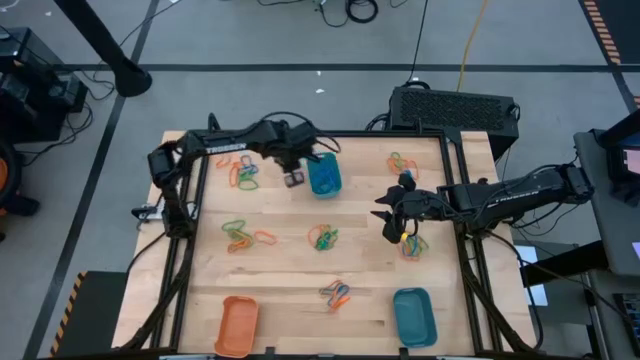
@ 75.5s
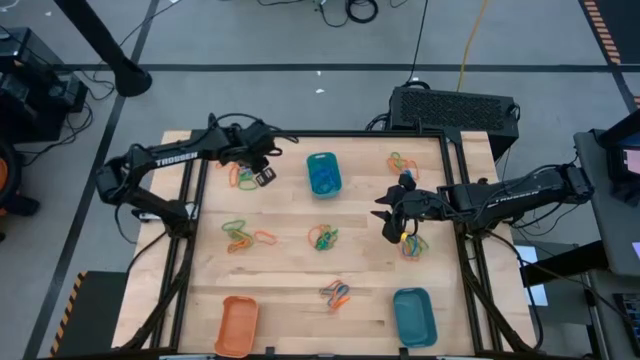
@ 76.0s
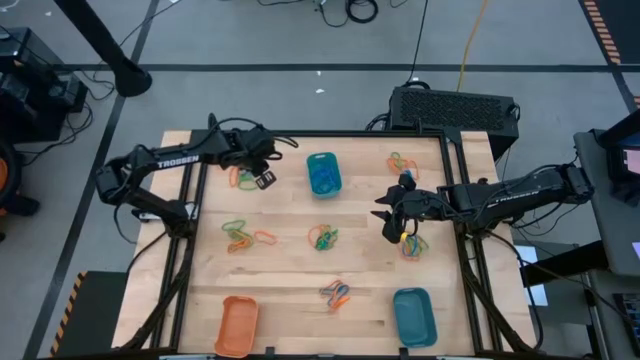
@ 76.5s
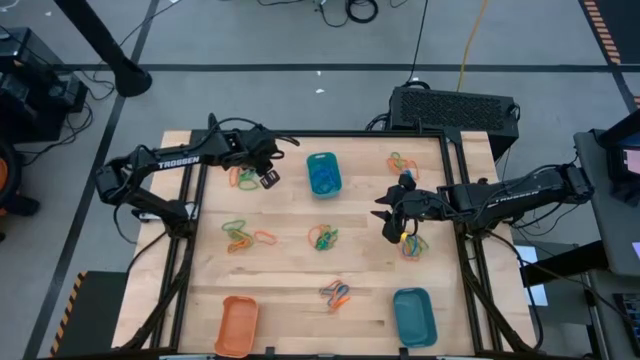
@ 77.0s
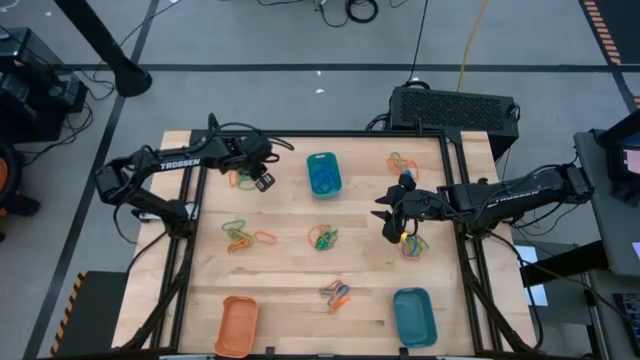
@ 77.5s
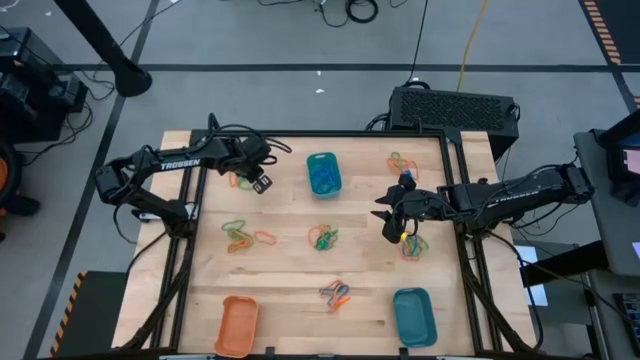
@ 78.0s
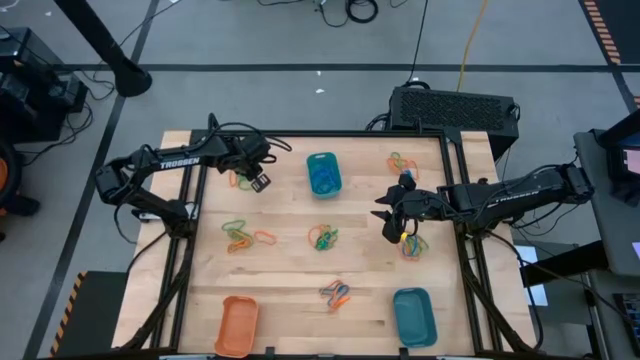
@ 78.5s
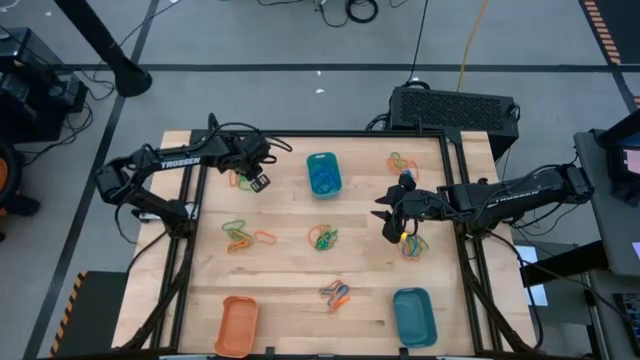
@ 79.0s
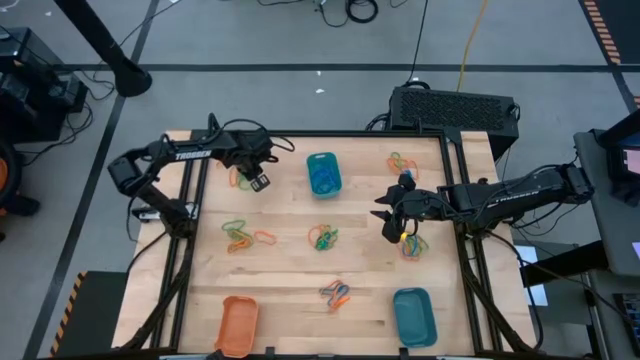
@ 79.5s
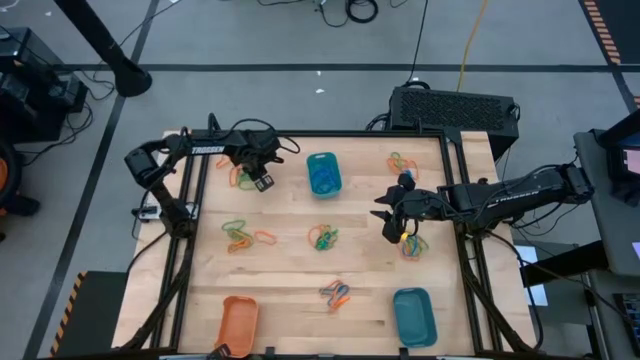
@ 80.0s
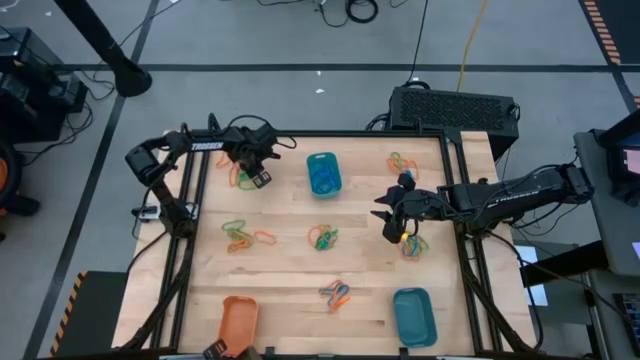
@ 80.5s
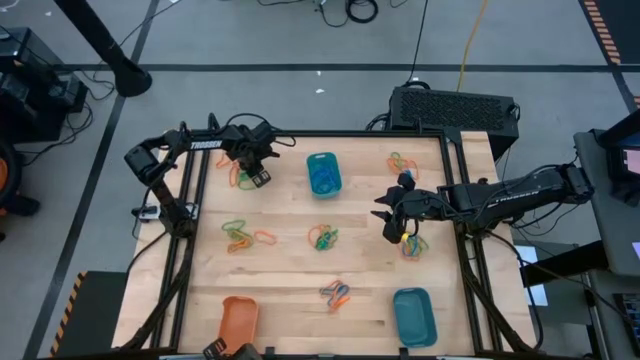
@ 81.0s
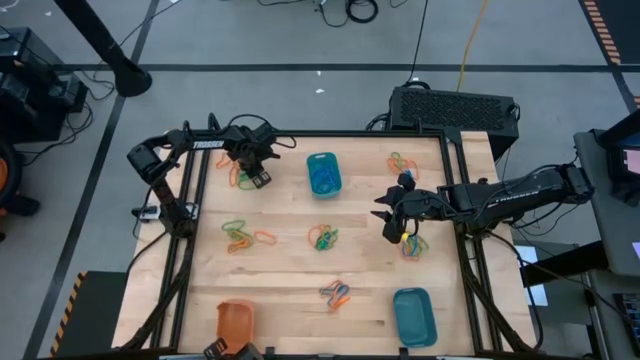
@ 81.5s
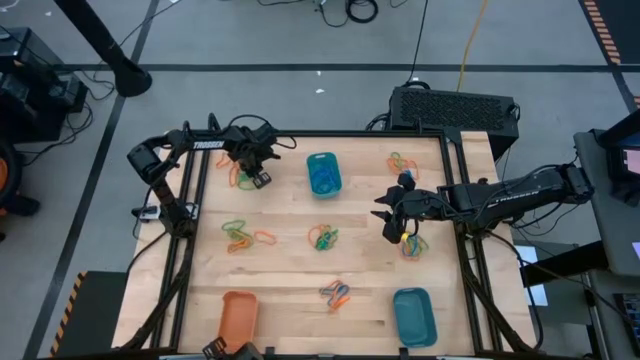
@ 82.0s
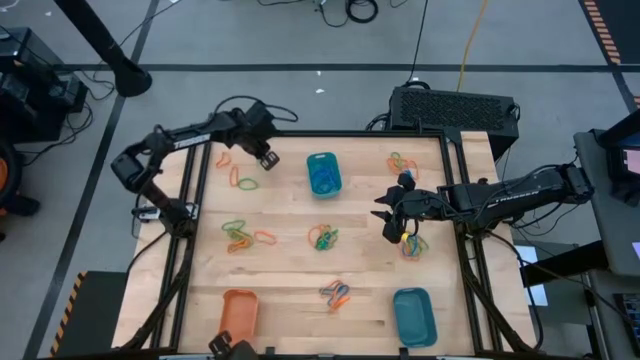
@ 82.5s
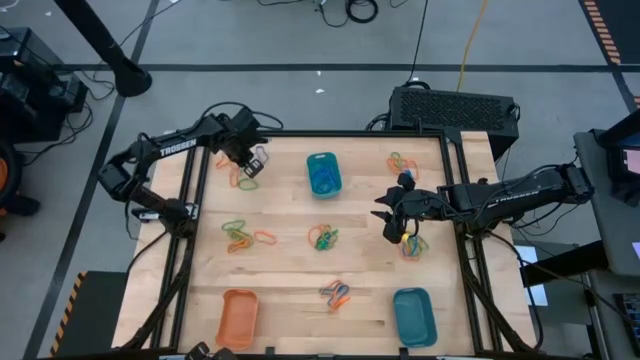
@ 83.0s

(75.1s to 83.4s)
Task: Sort rubber bands into baskets
Put the blue rubber band into the top blue bin

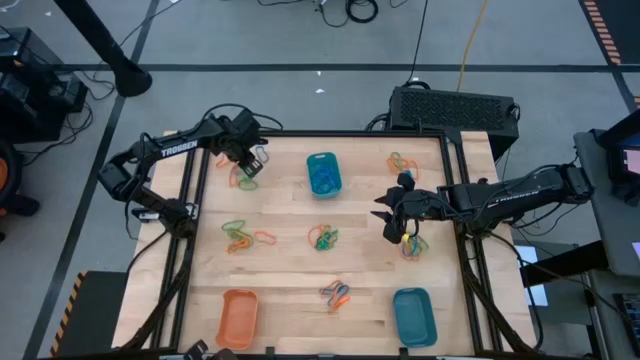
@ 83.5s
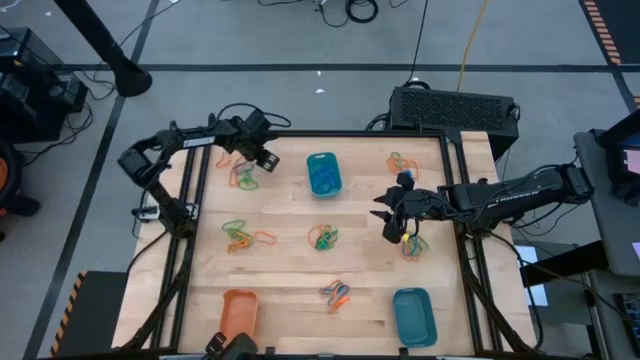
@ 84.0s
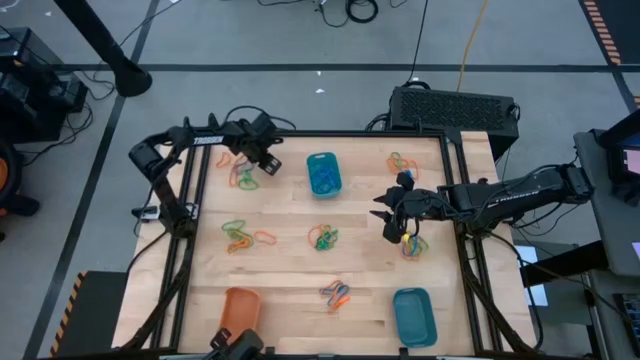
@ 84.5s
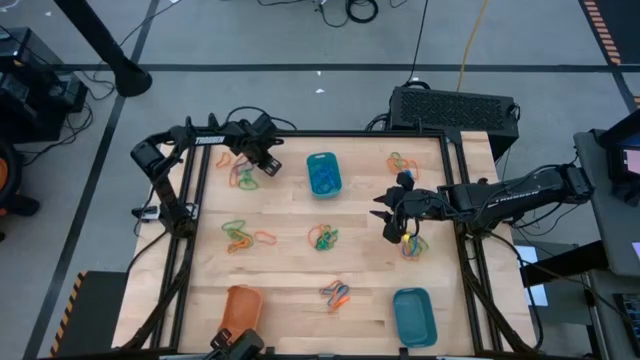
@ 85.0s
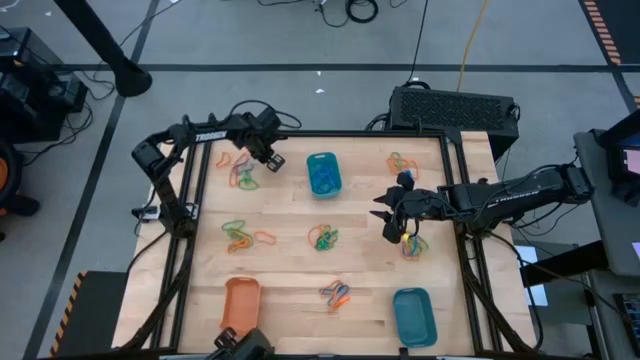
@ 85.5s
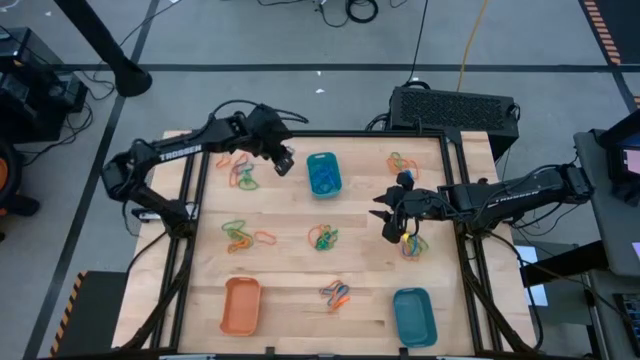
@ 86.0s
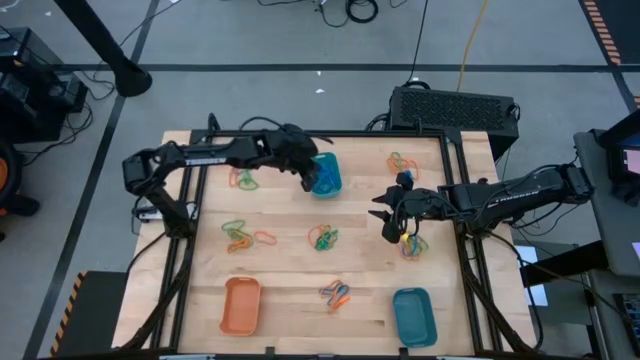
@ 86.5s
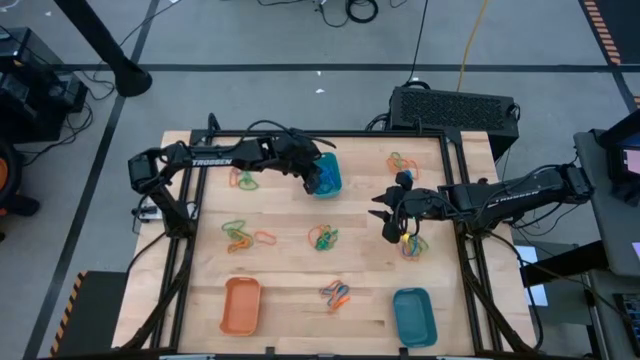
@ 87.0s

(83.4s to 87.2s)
Put the blue rubber band into the top blue bin

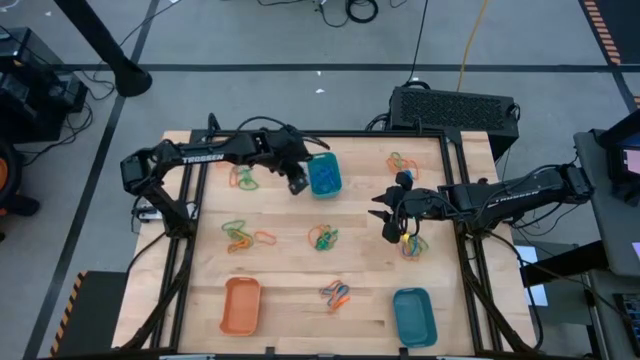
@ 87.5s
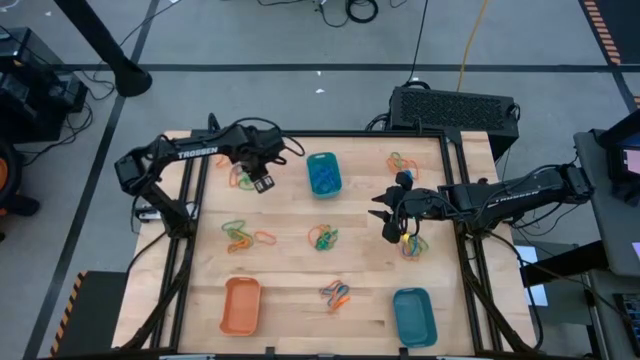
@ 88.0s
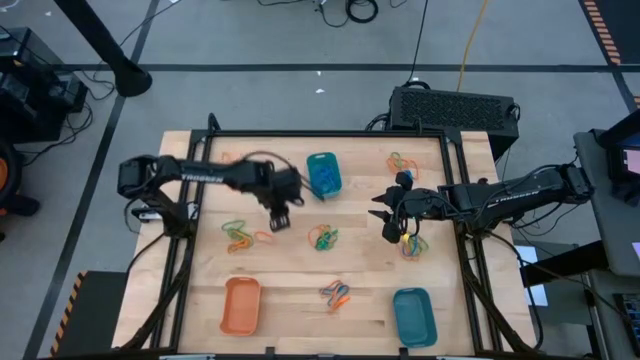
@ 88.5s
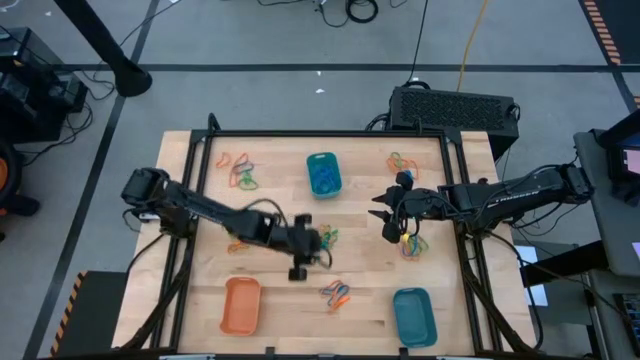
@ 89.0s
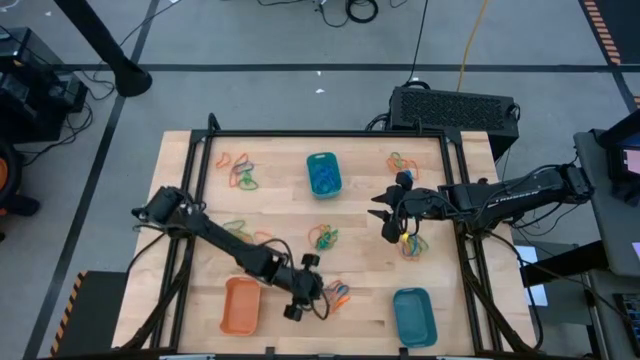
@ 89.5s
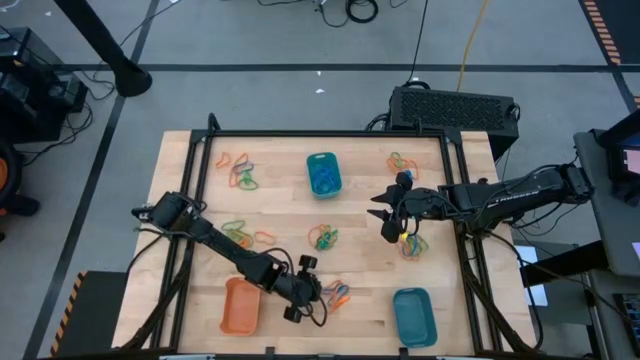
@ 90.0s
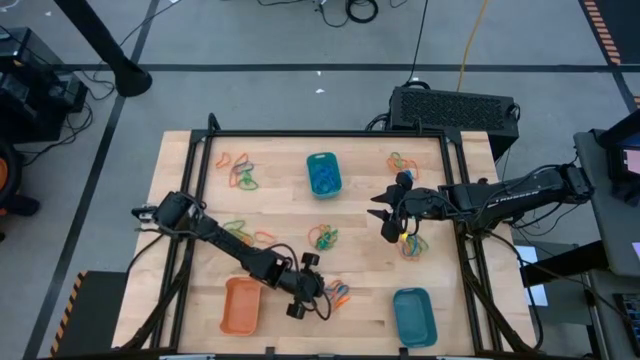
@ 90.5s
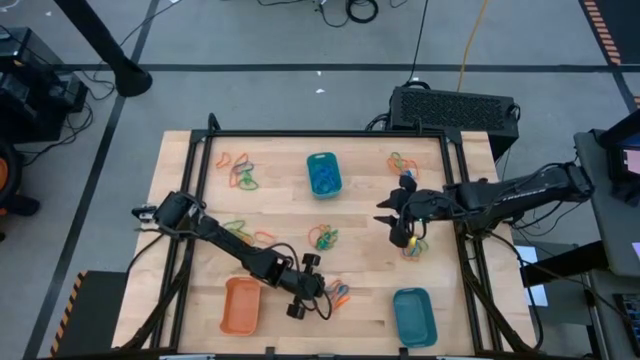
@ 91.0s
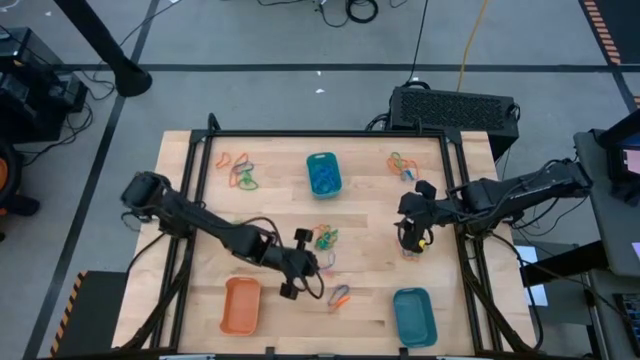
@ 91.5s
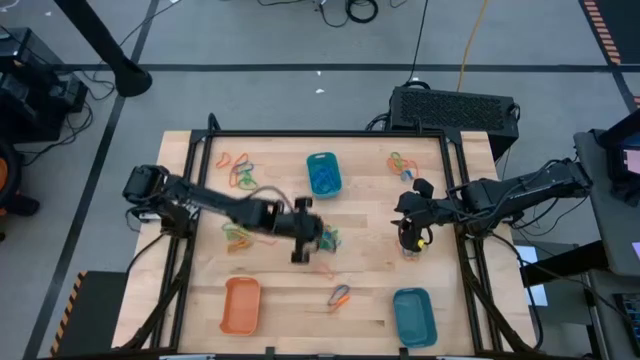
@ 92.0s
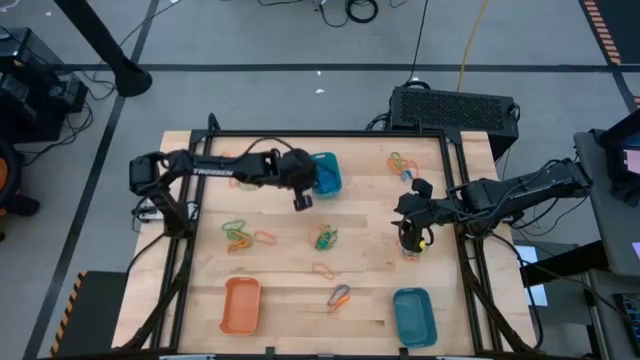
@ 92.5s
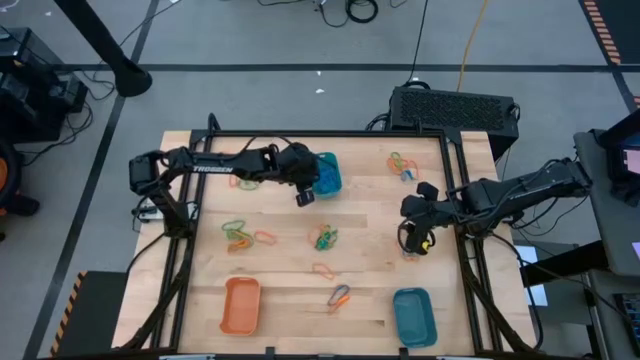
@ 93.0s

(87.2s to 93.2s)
Put the blue rubber band into the top blue bin

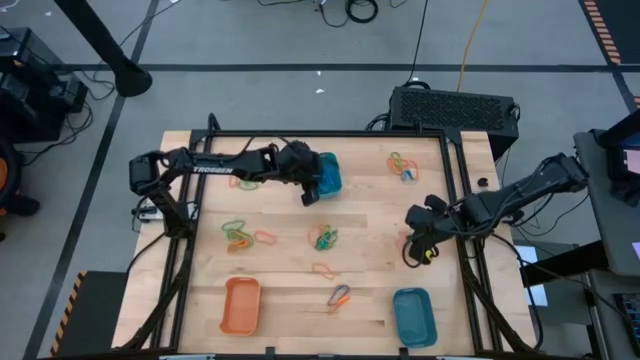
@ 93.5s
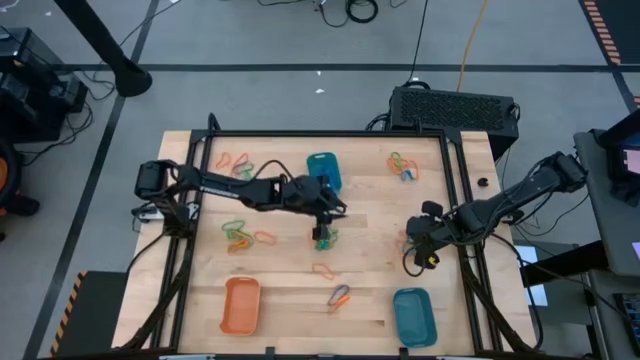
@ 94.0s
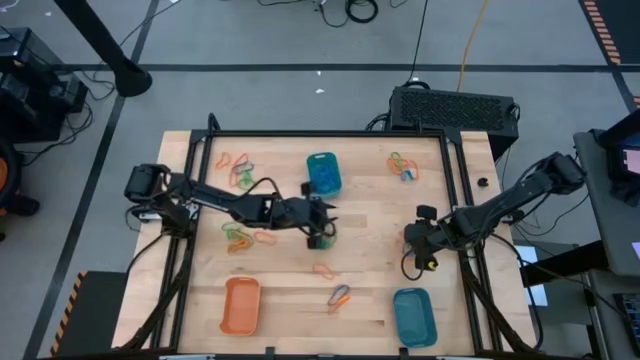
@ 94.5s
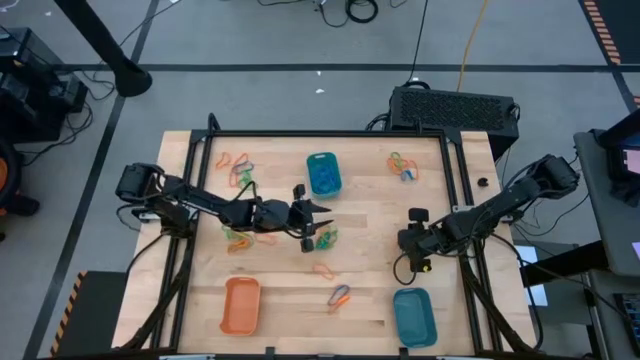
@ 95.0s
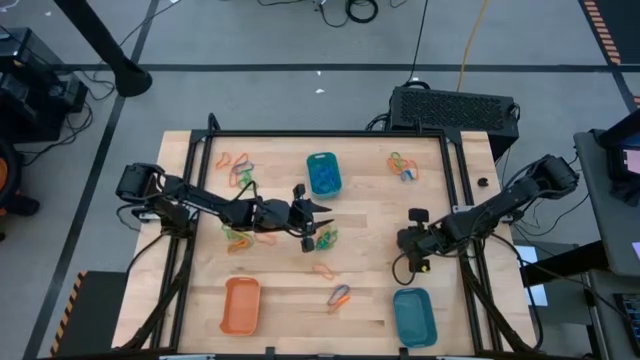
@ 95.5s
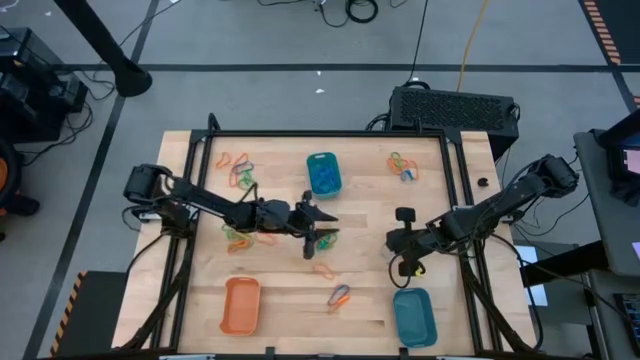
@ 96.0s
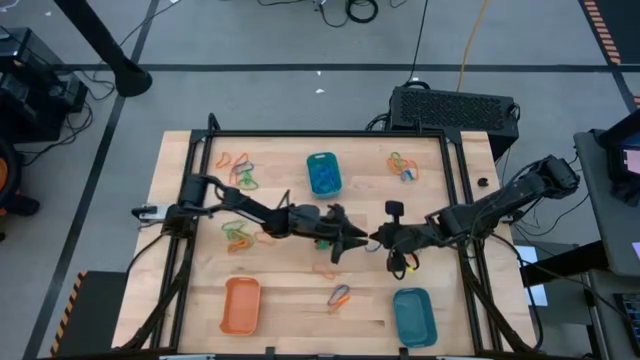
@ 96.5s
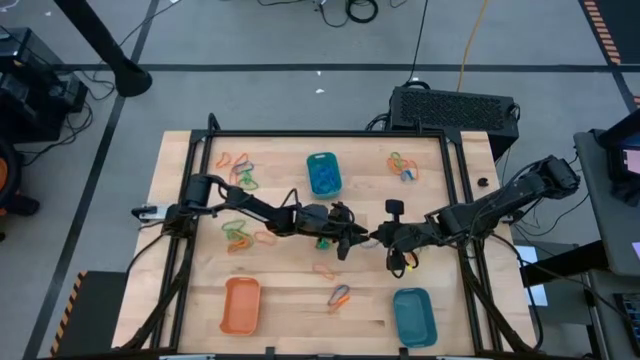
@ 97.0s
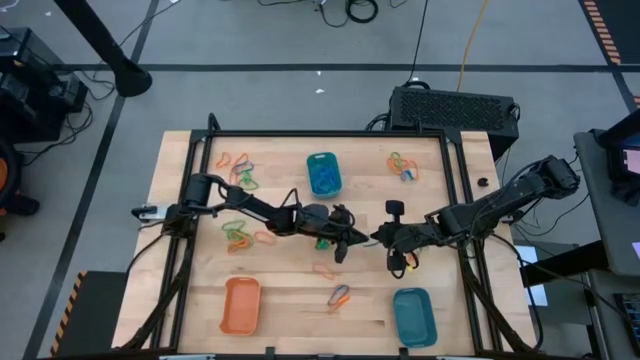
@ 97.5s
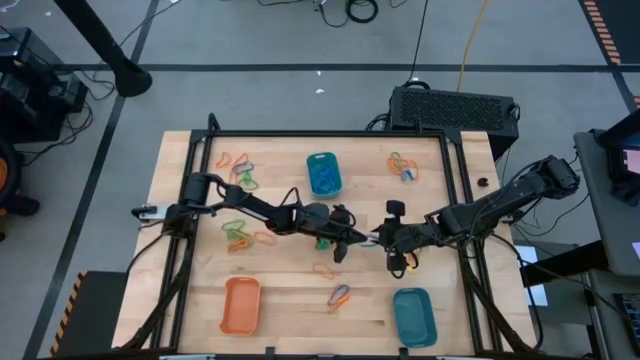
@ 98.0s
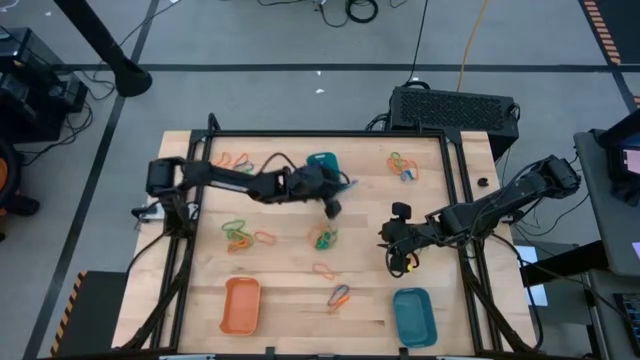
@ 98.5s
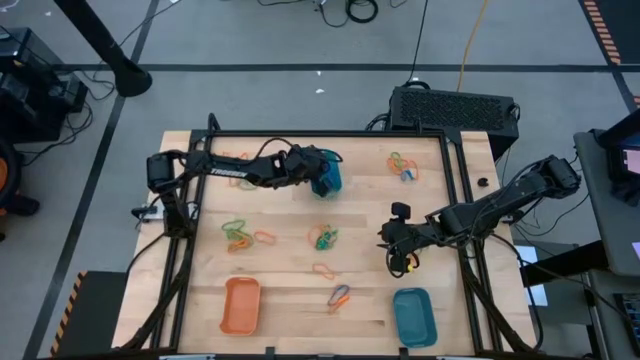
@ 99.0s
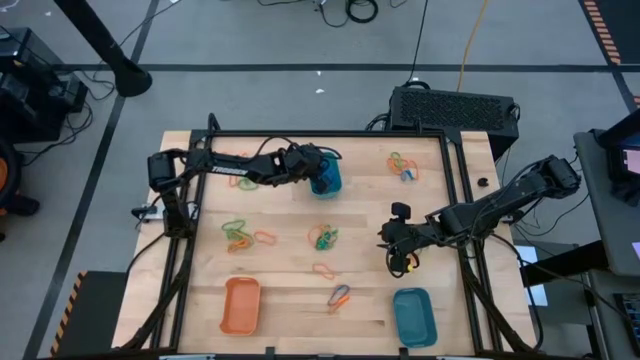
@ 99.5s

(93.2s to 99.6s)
Put the blue rubber band into the top blue bin
